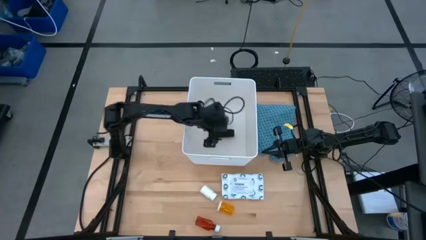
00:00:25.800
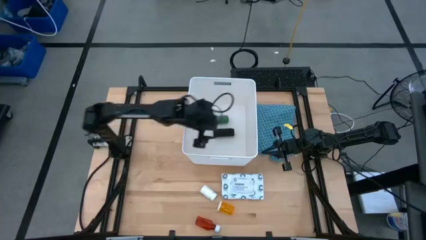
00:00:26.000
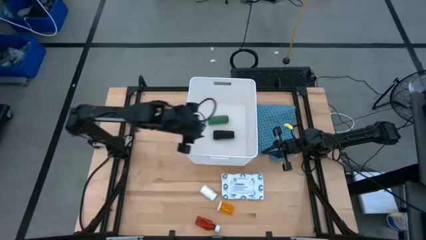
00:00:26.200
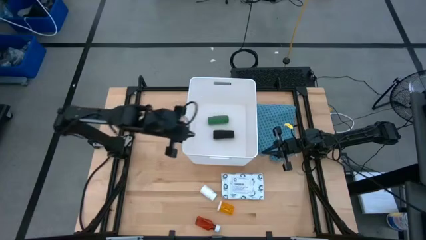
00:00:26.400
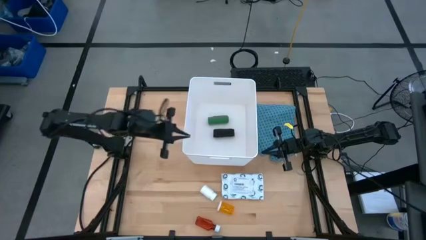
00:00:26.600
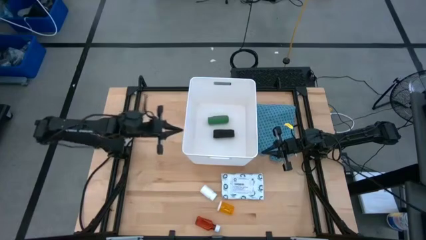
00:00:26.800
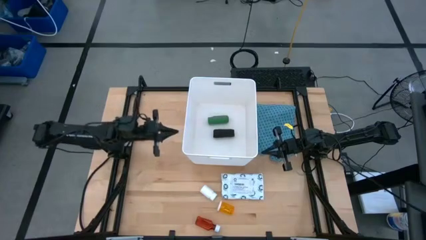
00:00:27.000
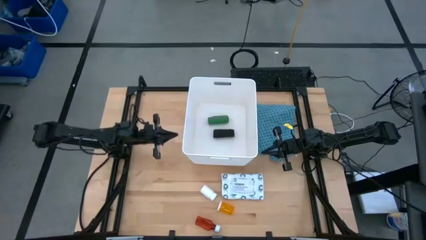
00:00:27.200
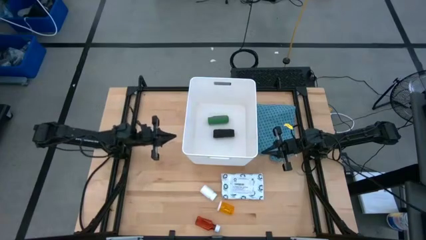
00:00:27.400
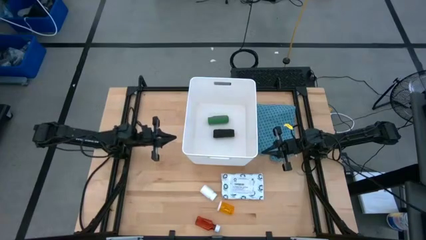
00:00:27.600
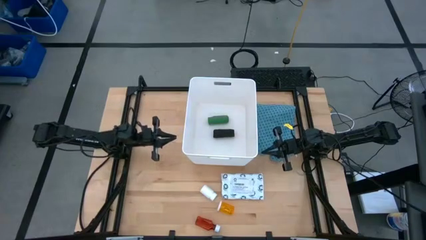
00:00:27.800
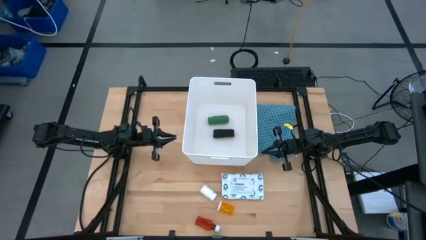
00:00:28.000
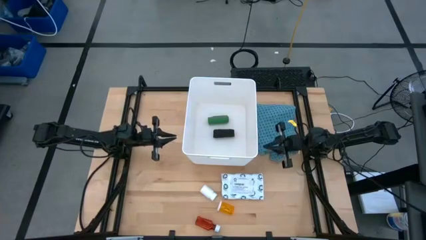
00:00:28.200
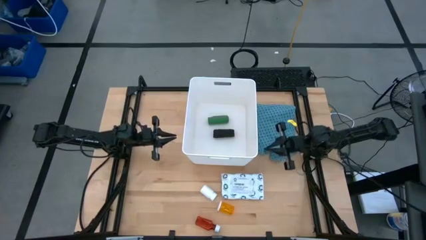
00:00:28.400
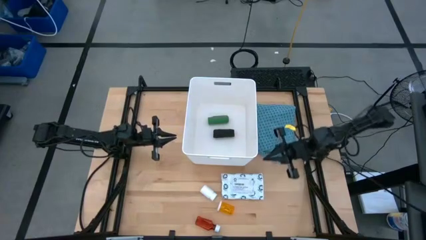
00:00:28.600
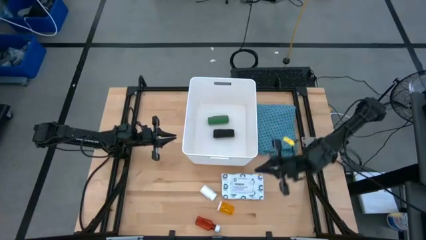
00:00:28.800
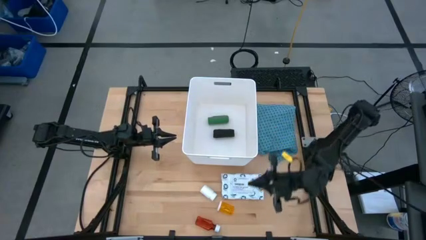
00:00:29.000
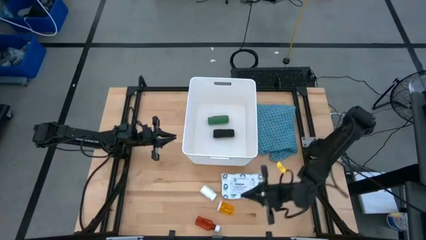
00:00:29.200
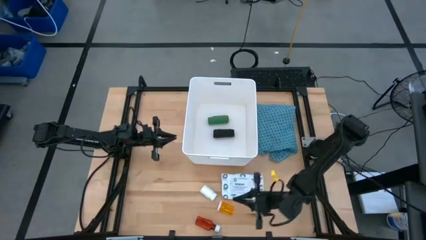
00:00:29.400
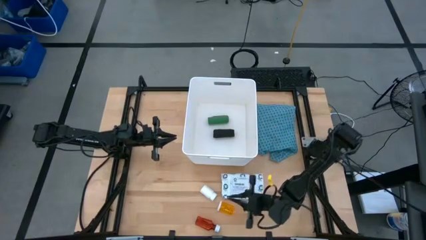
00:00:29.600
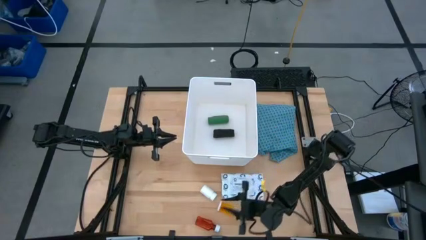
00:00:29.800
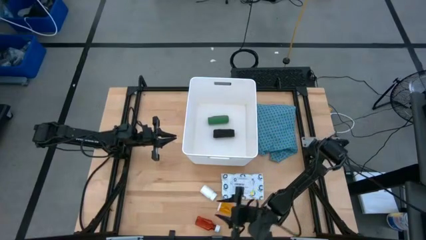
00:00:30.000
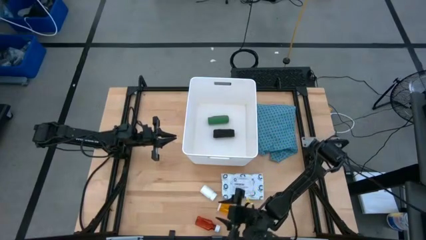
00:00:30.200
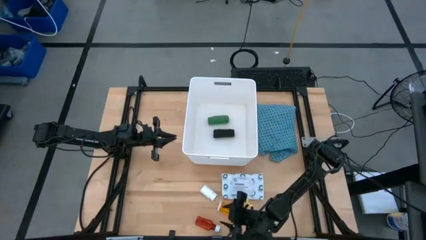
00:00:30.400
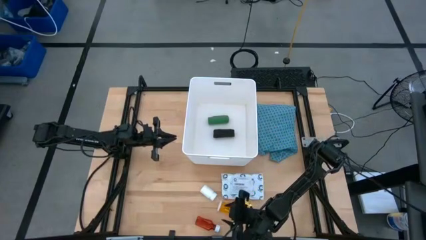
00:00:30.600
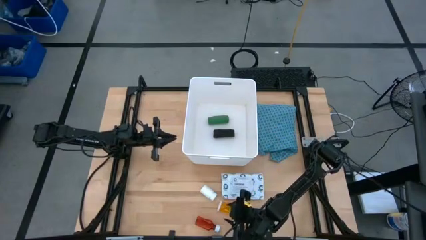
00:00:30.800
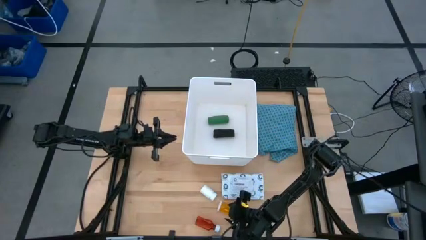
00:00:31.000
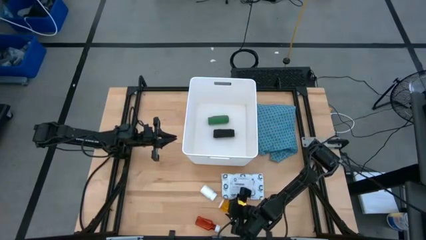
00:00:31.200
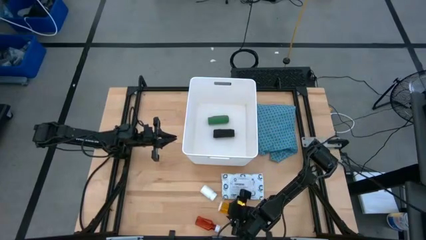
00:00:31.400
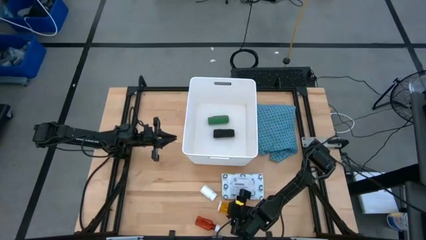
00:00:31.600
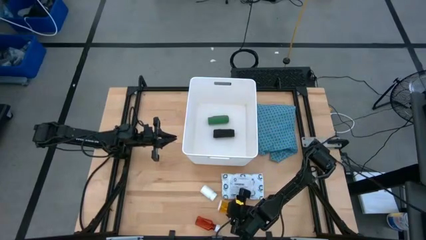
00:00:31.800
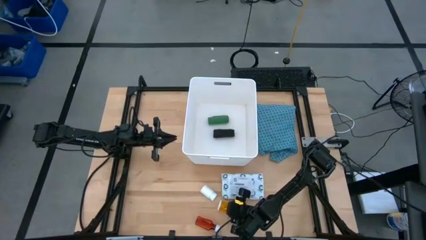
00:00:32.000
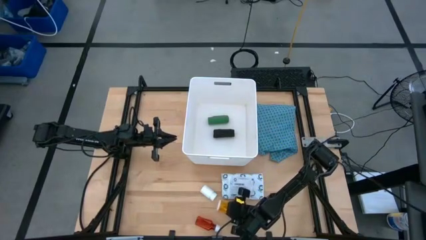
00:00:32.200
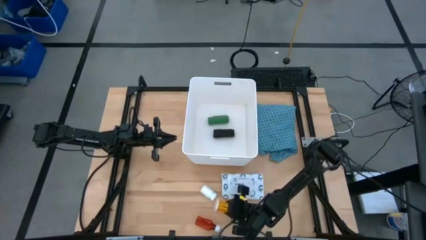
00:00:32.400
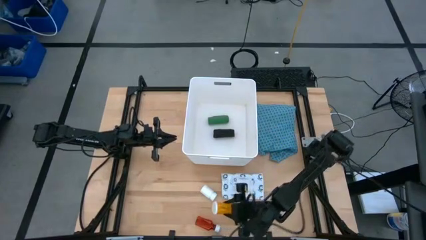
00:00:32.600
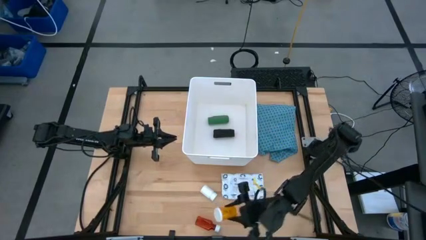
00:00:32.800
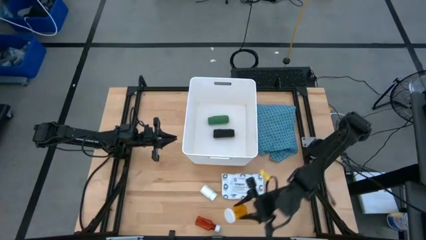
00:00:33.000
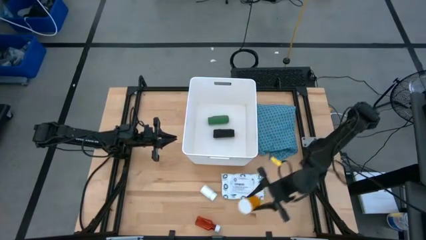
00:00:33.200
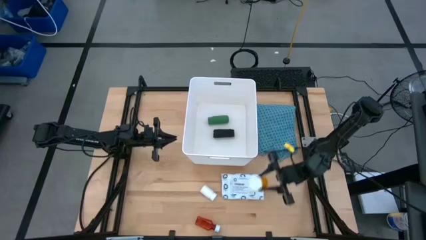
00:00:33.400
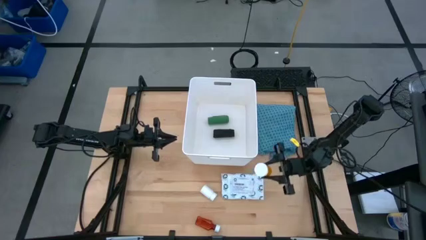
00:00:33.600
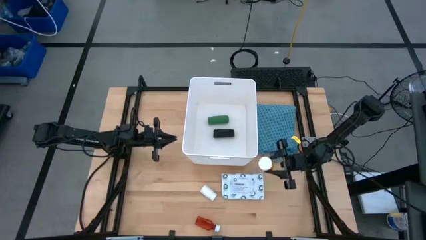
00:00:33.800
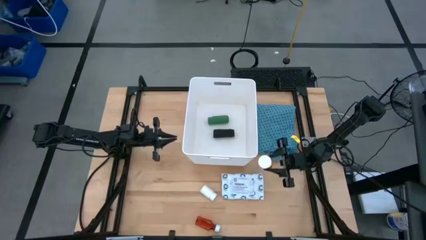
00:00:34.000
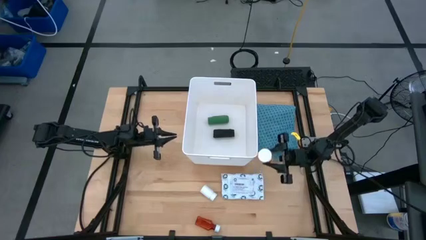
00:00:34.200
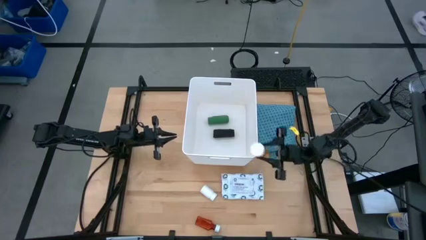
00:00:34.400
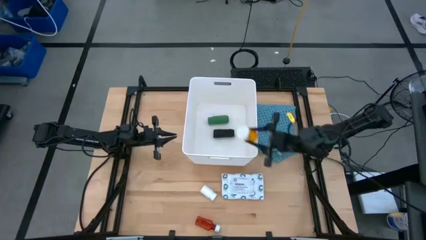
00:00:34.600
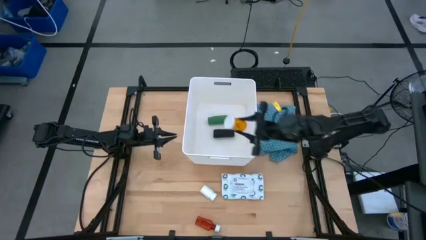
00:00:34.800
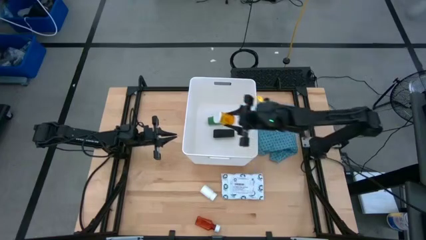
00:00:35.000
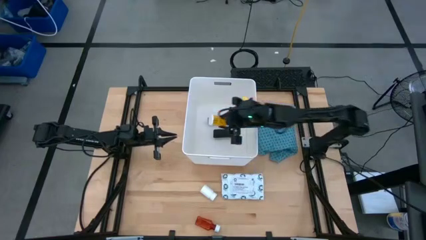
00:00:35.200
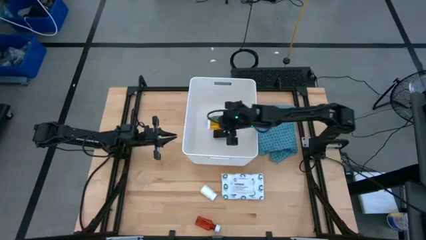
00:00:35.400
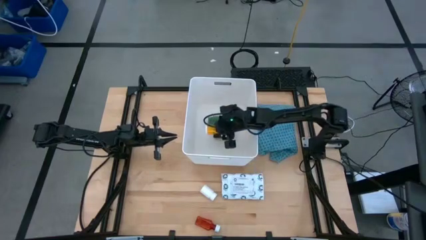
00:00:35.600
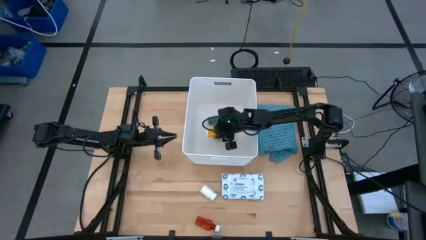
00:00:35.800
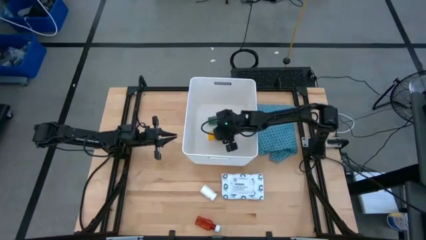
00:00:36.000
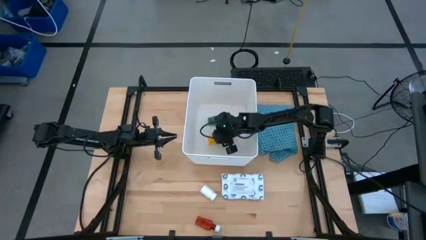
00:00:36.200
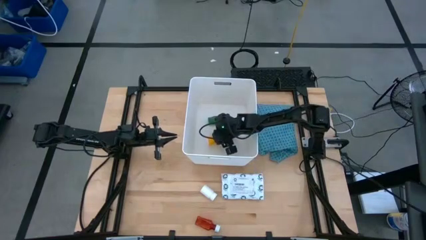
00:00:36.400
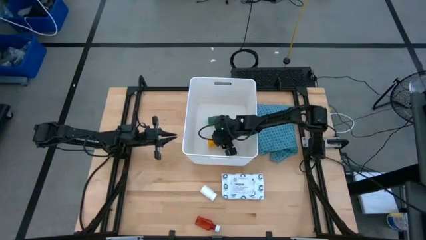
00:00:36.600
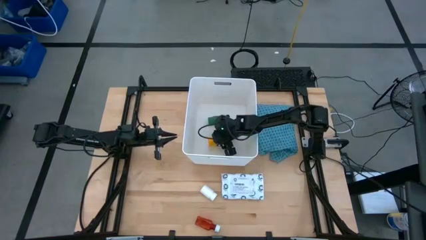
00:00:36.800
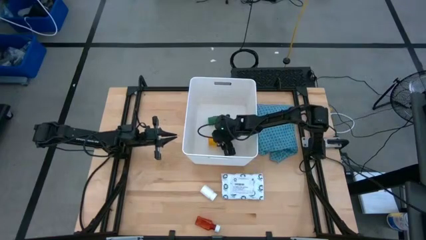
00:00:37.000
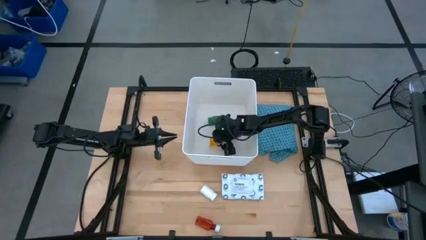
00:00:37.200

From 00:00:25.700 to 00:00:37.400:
Task: Pick & place medical supplies in basket/bin
Put the orange pill bottle into the white bin

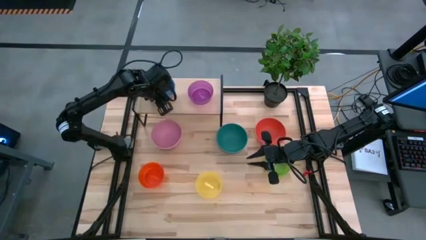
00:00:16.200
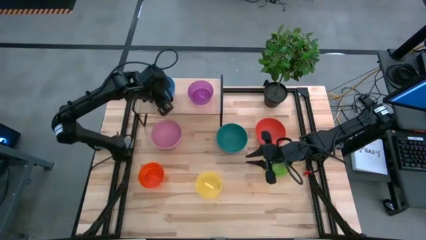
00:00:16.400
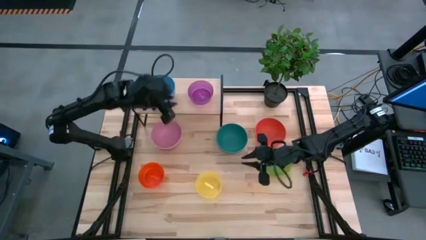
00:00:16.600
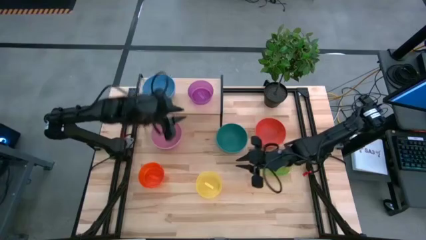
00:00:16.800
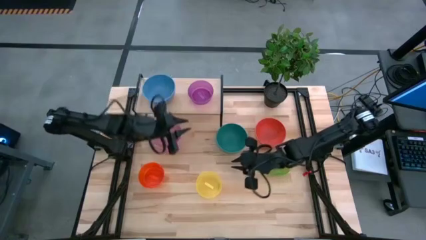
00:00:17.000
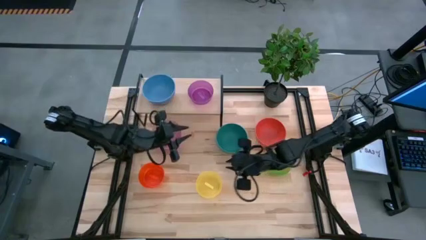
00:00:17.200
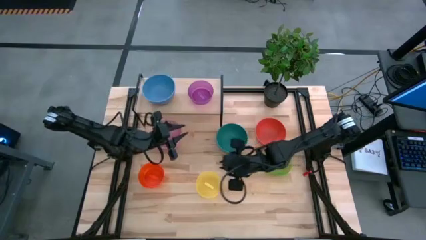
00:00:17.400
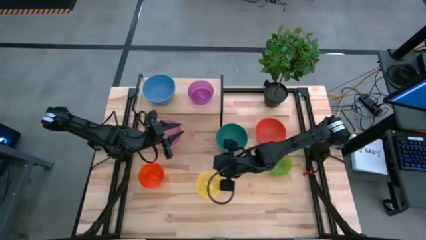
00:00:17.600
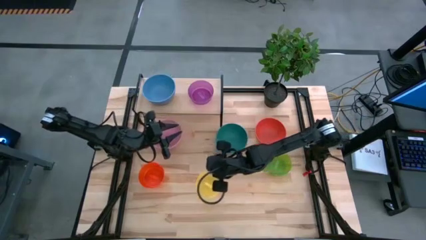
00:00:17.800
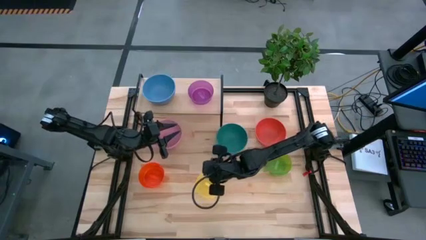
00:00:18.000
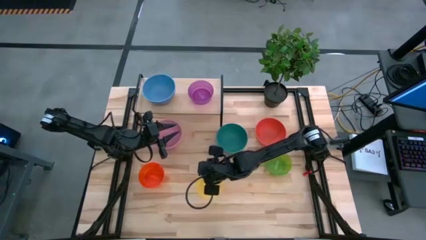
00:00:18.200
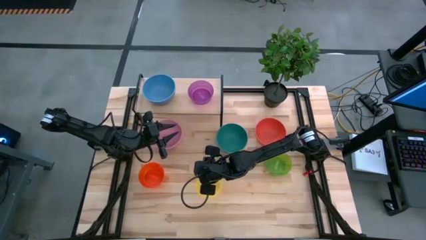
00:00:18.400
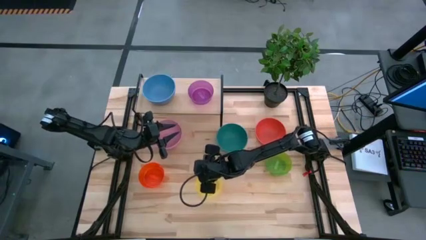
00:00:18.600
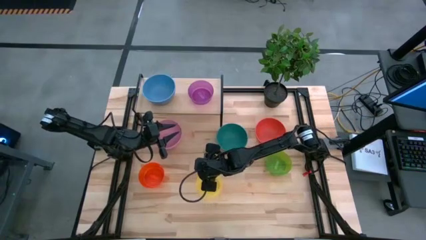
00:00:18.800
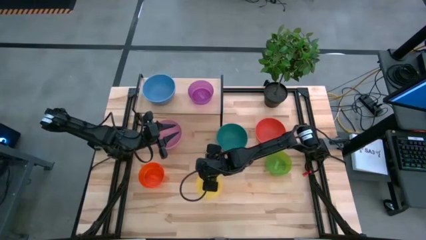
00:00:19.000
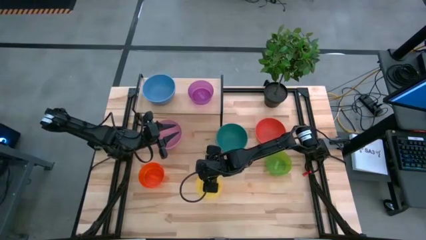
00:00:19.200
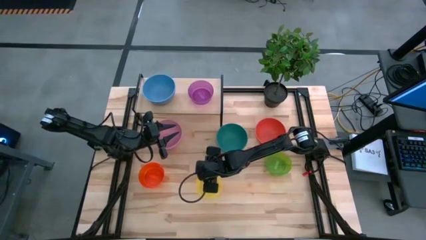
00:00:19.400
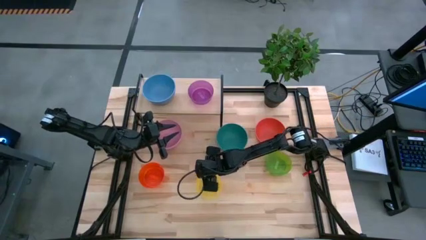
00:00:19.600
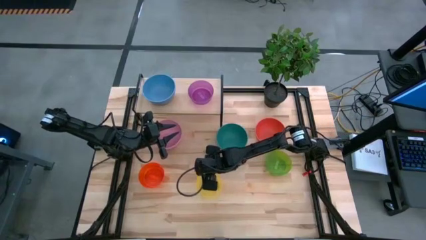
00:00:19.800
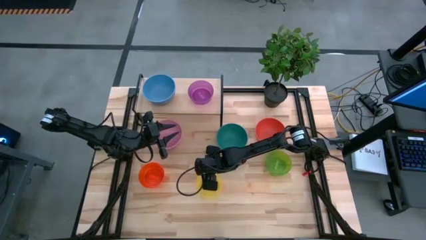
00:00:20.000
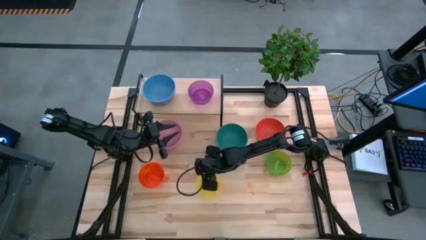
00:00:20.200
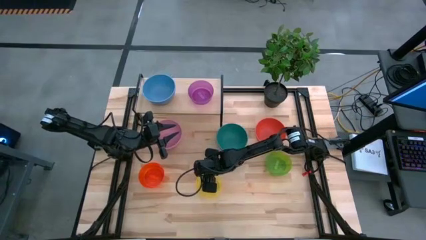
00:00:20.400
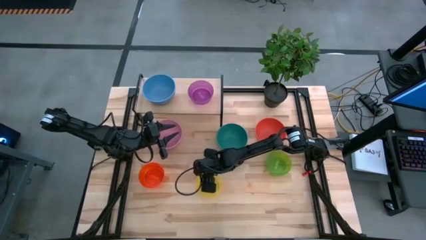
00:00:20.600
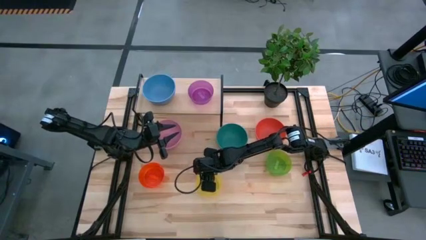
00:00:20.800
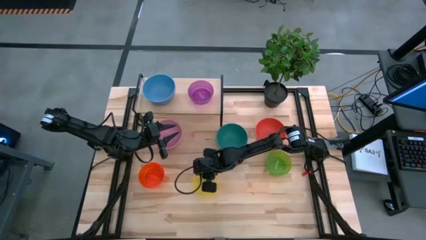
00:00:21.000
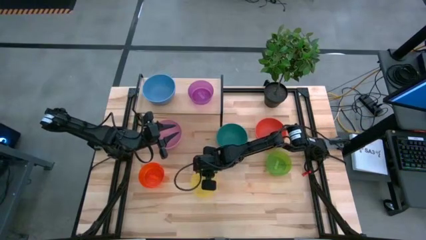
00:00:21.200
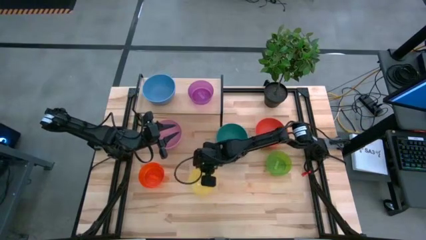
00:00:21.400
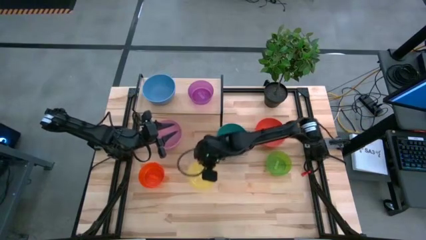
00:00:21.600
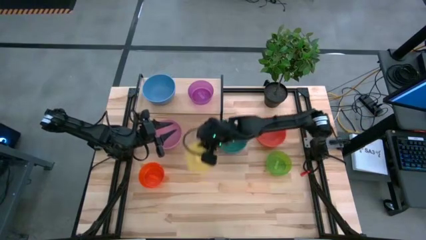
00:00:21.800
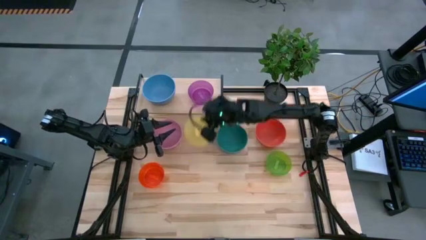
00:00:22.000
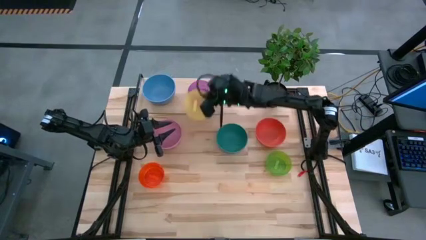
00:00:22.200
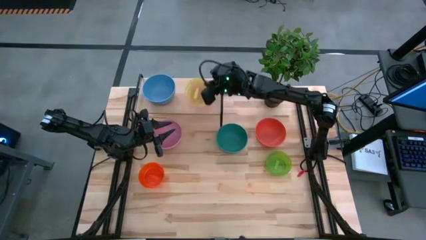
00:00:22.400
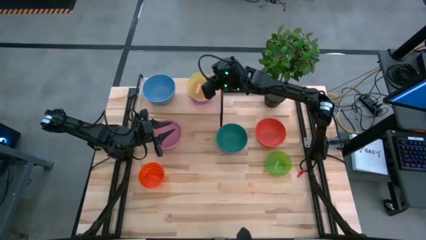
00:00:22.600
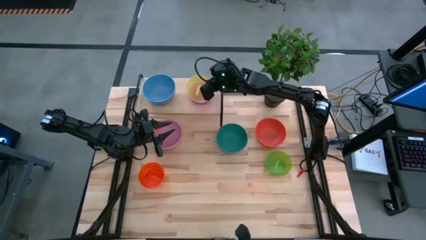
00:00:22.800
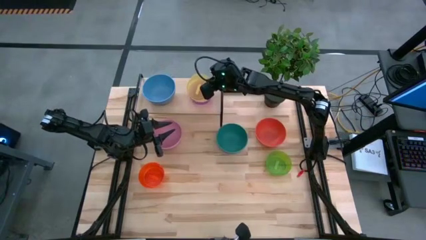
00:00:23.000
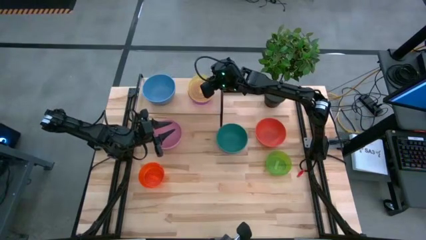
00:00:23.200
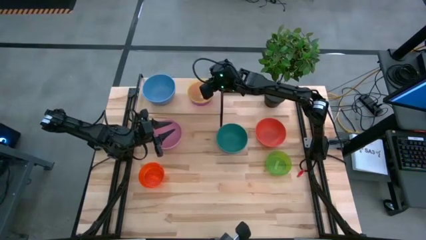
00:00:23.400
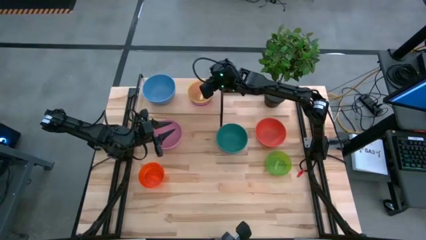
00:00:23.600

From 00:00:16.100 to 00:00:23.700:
Task: Place and stack bowls onto a shelf
Stack the yellow bowl on the purple bowl on the shelf
